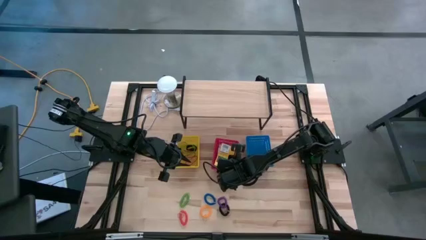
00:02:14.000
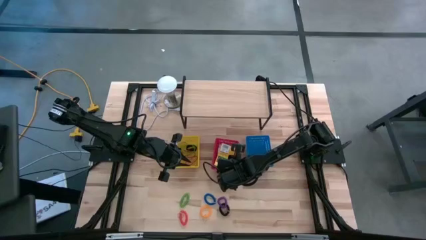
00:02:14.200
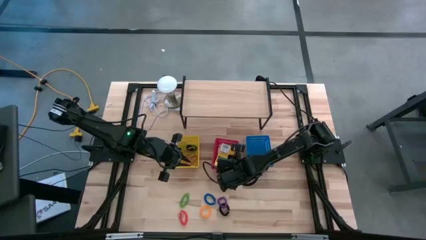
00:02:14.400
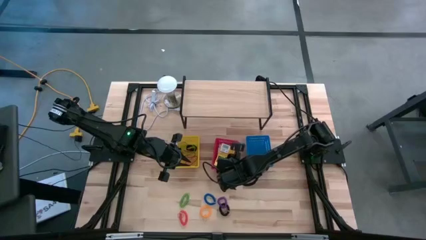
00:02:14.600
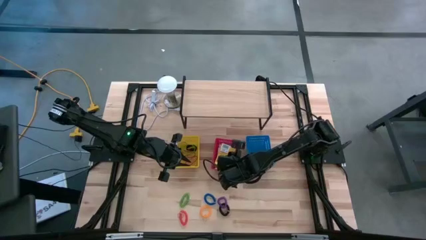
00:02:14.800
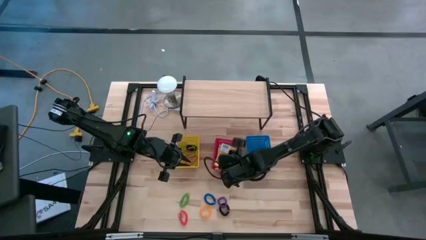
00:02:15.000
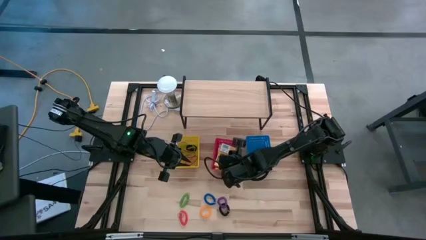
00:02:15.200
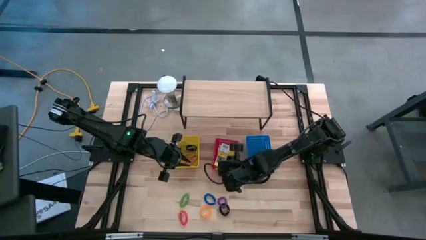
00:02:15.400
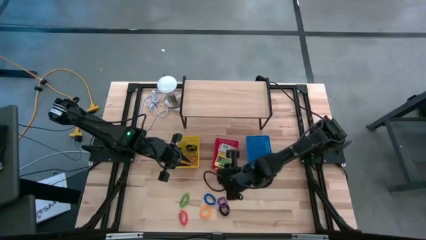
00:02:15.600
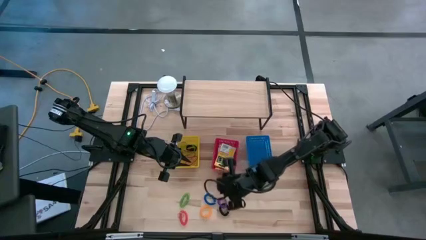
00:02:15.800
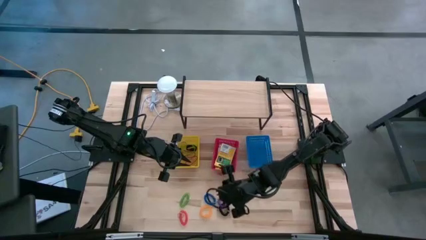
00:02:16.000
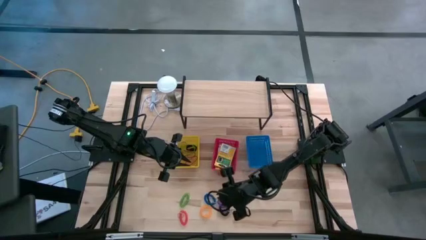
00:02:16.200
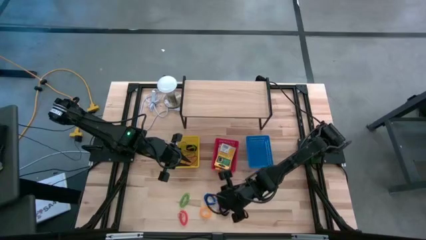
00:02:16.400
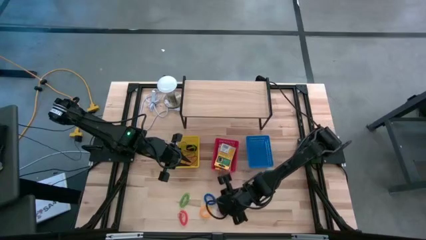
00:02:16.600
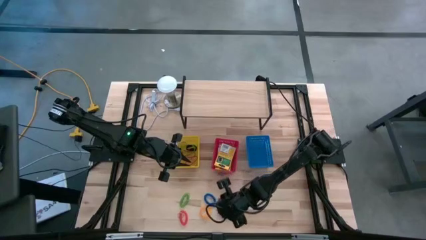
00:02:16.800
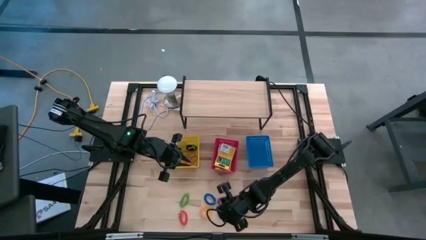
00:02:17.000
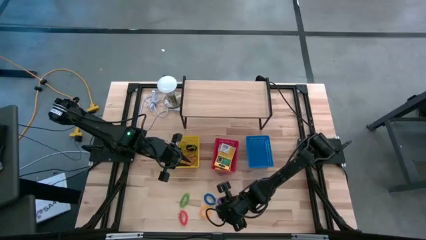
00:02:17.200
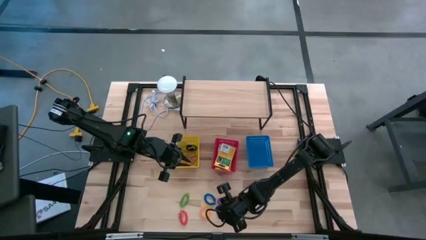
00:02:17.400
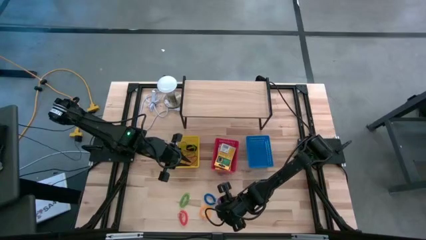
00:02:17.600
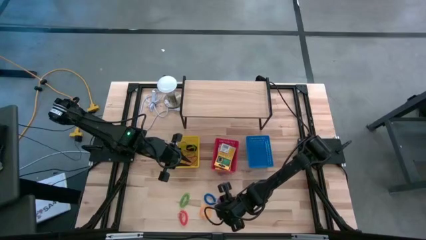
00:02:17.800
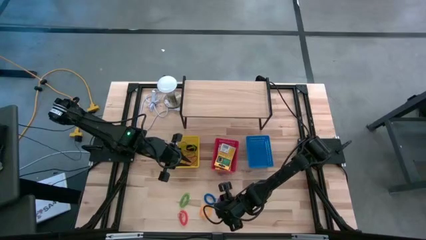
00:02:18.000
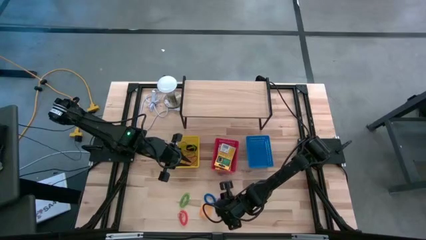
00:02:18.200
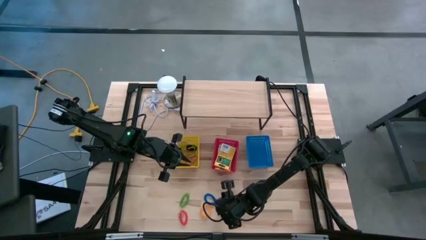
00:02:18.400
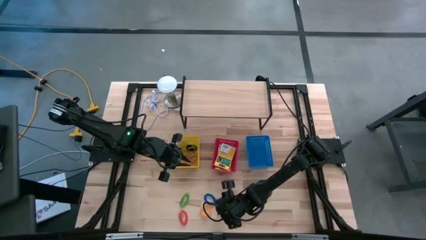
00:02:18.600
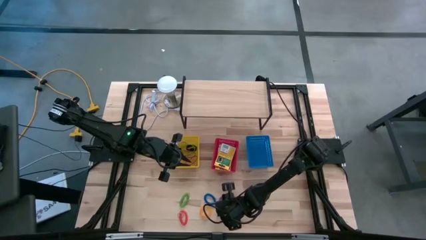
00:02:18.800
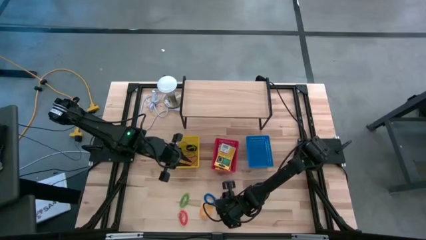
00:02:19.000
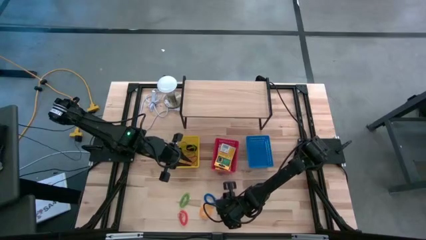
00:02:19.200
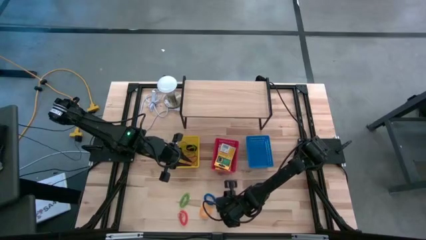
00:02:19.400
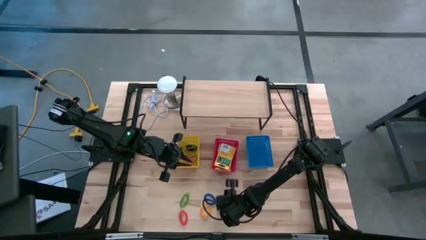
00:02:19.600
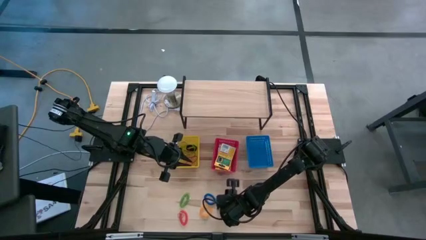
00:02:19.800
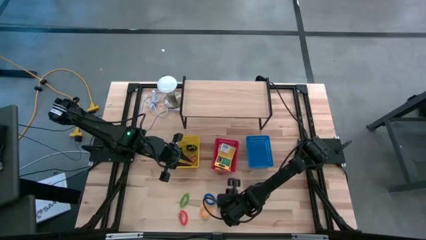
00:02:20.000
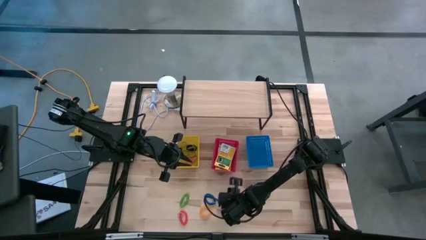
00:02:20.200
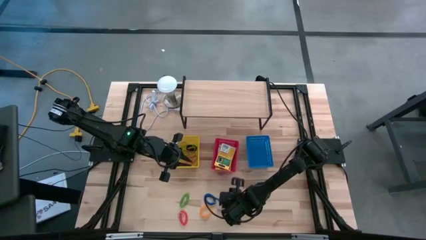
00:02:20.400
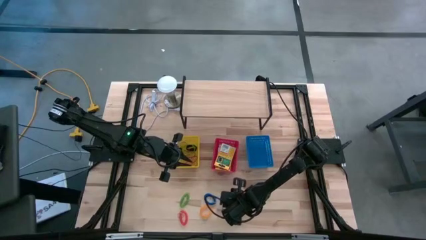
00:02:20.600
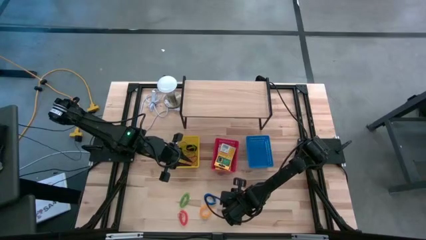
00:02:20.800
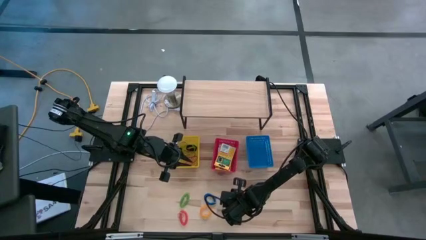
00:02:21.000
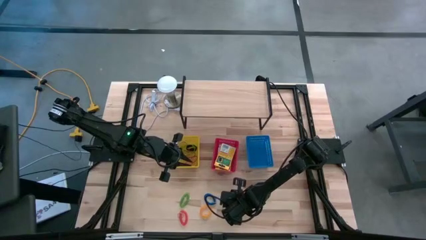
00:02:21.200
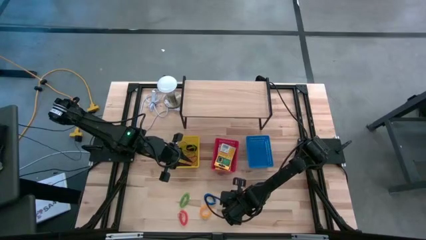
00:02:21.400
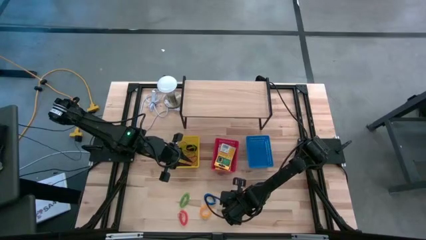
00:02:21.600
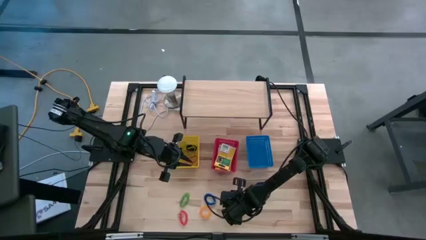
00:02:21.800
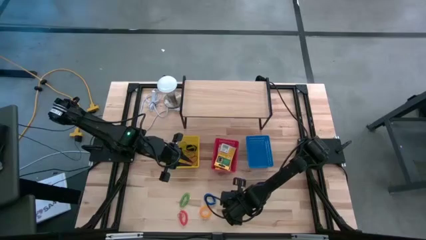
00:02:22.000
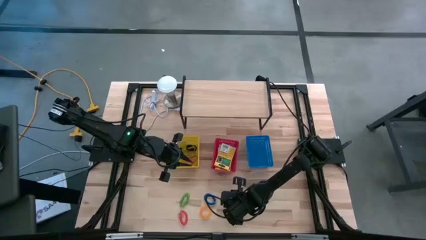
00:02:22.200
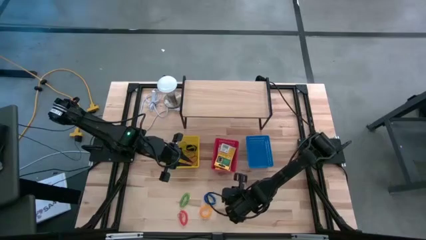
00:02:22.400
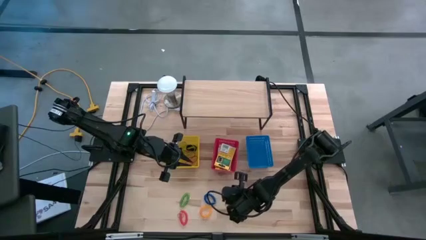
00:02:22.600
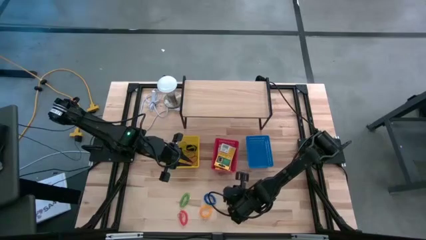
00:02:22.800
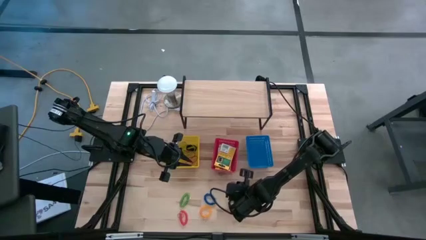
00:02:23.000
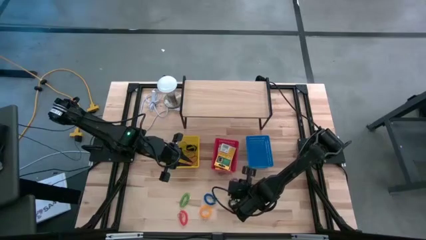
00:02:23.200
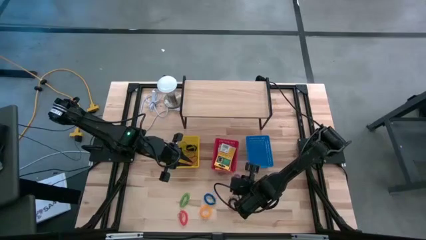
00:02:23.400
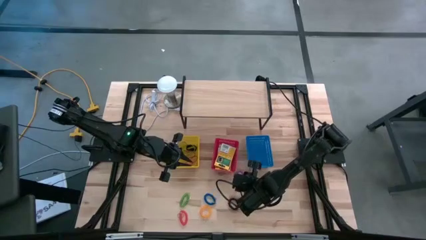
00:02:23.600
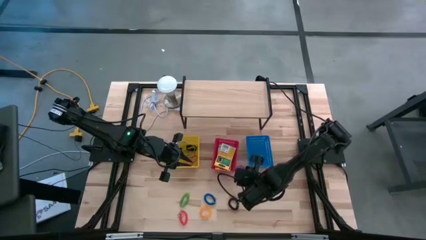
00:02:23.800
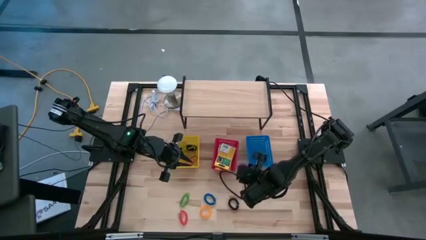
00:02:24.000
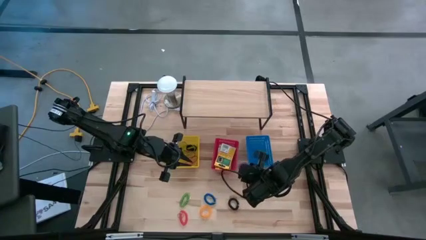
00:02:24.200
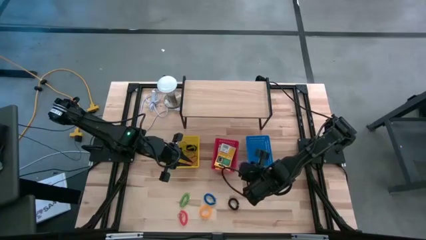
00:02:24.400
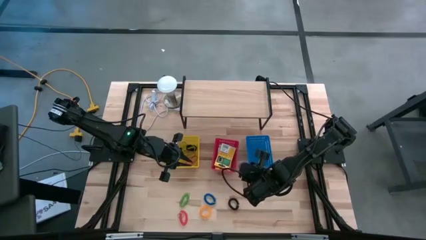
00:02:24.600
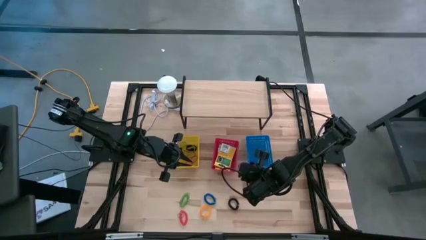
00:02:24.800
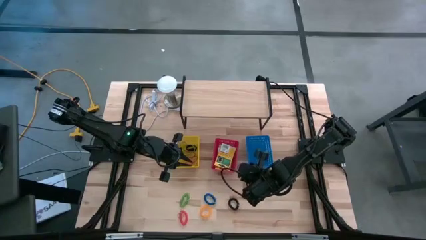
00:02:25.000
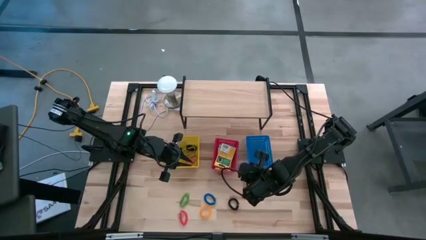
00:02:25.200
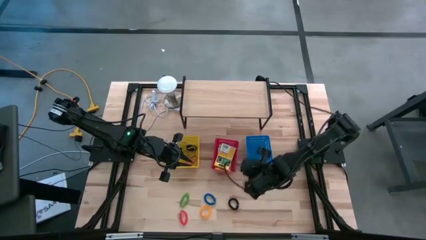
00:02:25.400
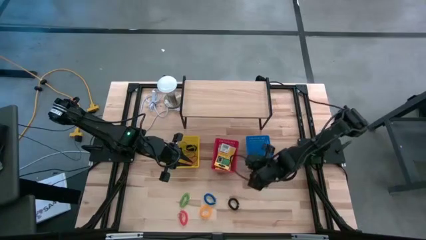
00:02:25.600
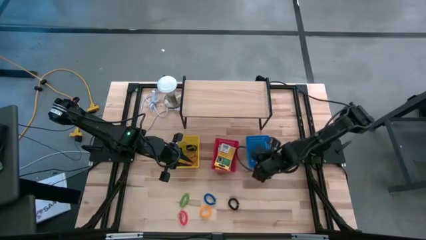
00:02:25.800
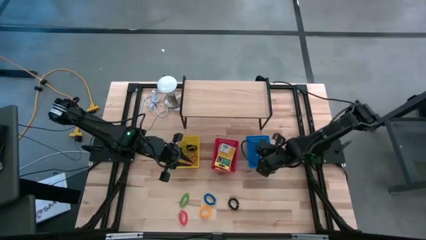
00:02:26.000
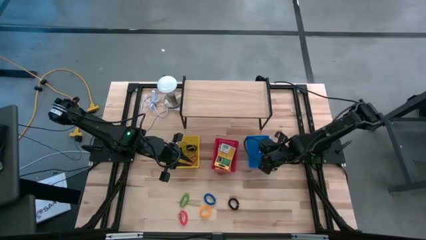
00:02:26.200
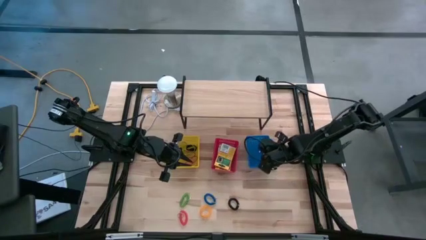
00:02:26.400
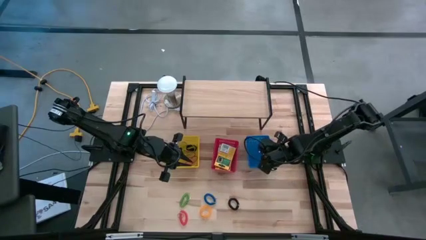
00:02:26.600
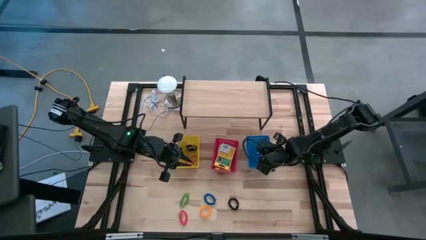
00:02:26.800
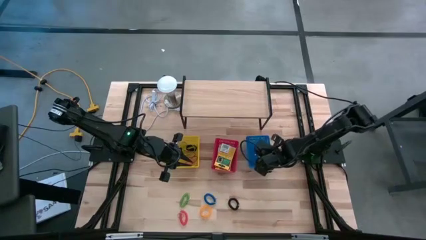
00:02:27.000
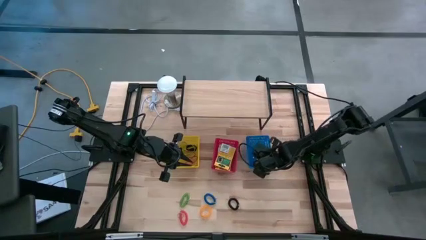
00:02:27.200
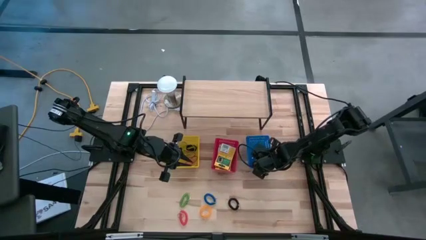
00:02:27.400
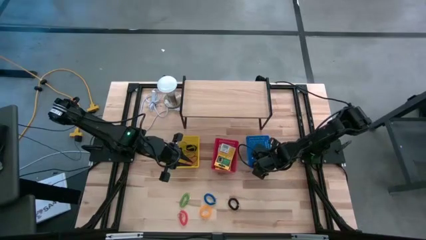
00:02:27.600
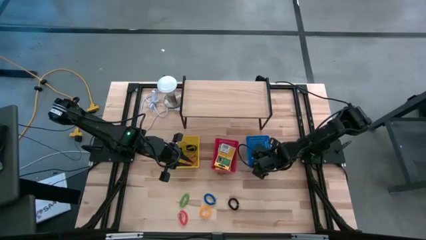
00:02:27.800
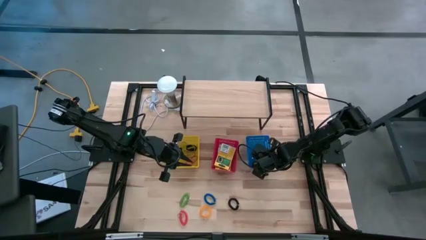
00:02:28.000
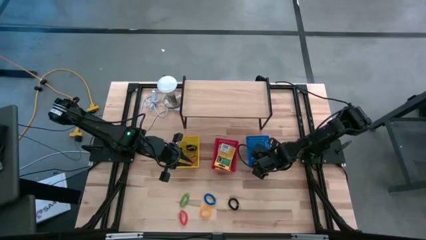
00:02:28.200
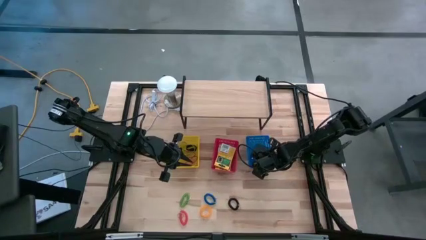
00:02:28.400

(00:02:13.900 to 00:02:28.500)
Task: Pick & Place Office Desk Supplies
Put the violet spiral keychain into the blue bin
